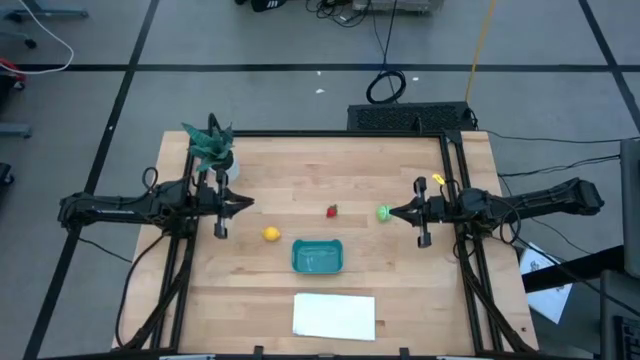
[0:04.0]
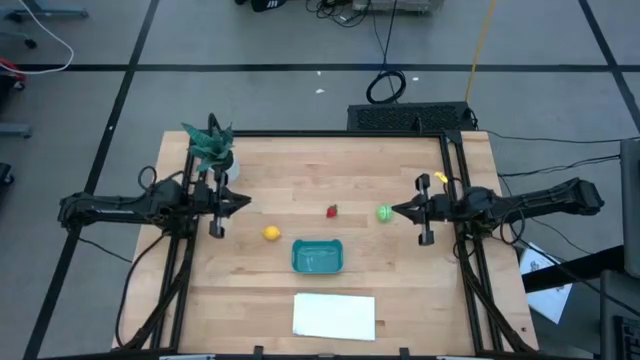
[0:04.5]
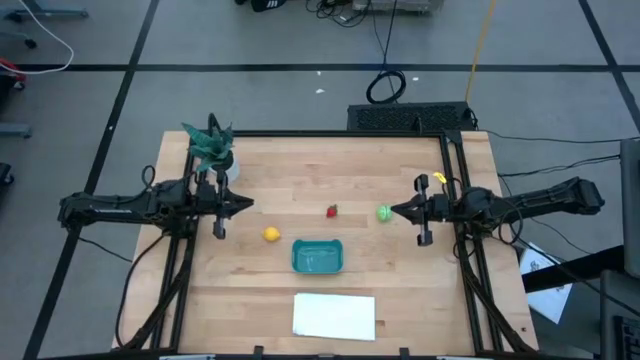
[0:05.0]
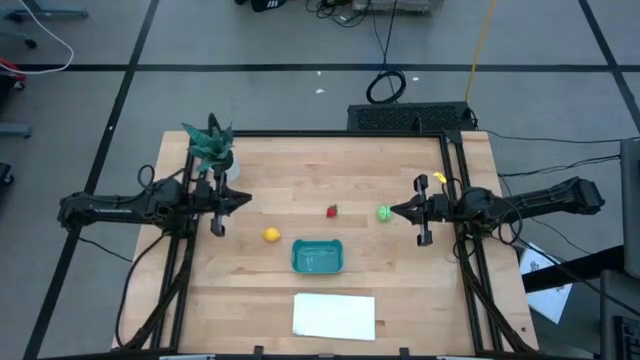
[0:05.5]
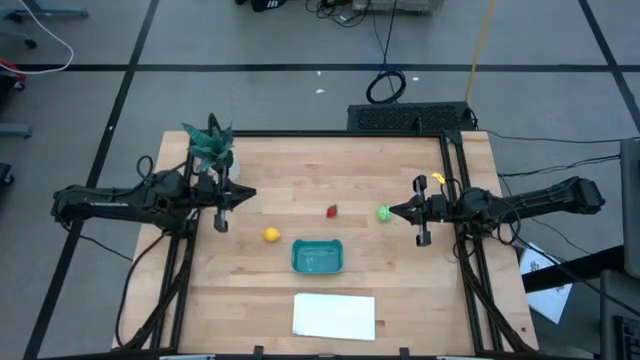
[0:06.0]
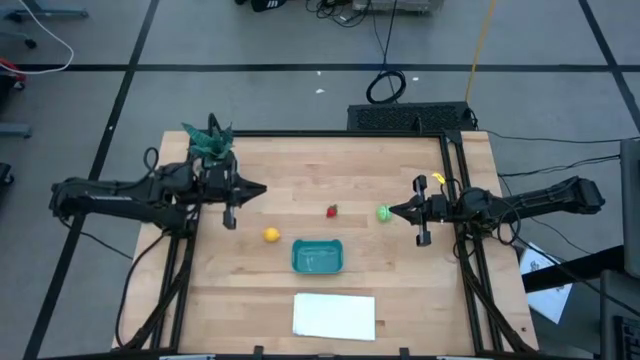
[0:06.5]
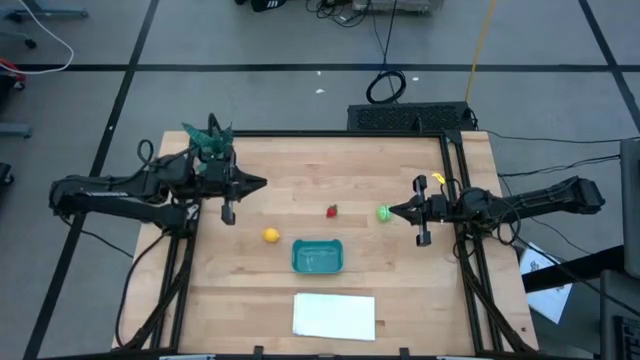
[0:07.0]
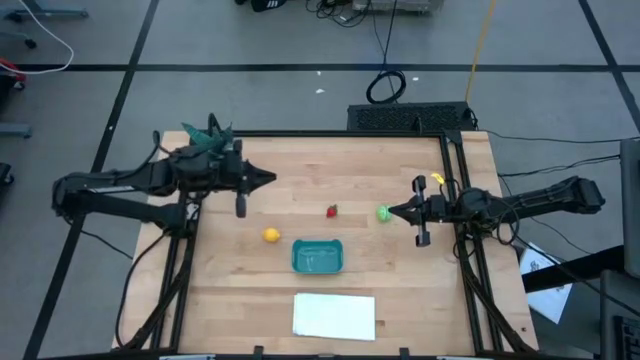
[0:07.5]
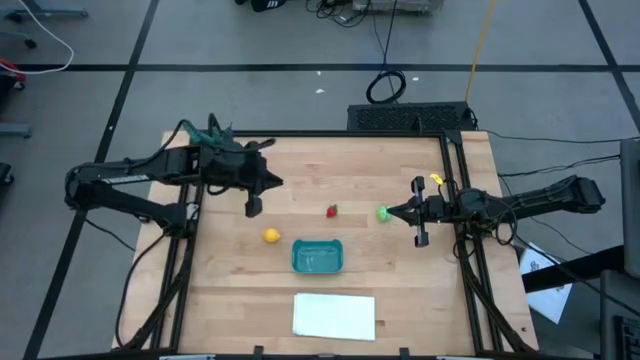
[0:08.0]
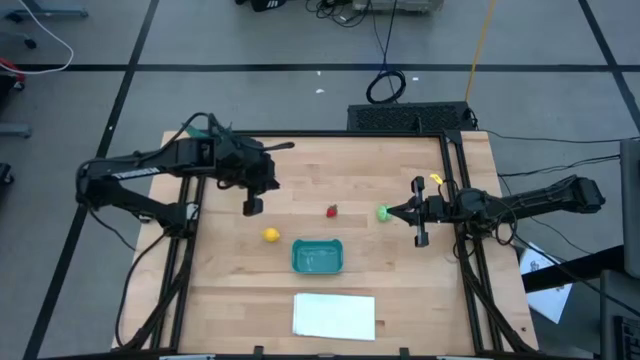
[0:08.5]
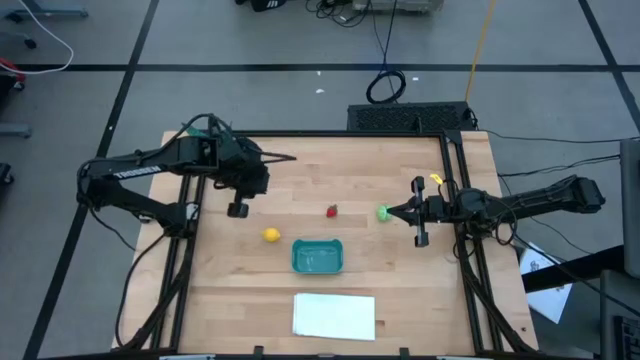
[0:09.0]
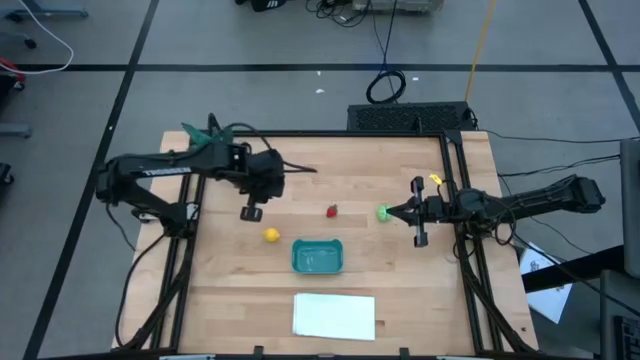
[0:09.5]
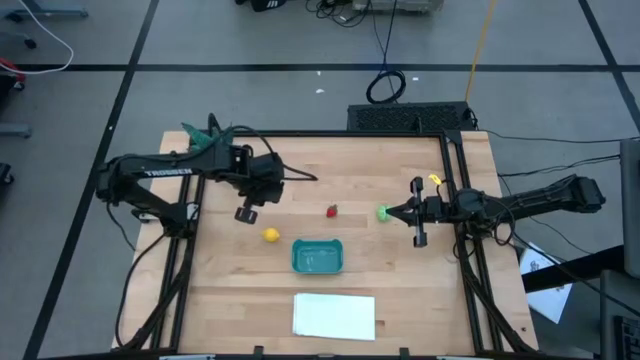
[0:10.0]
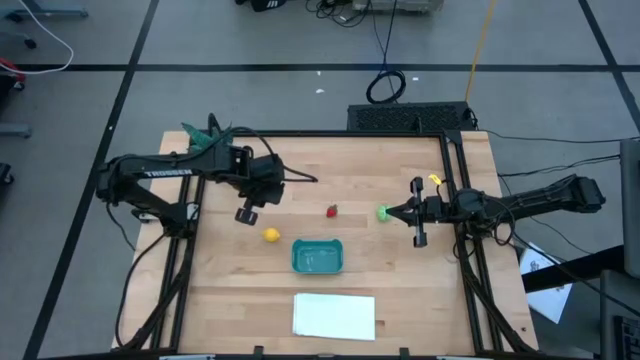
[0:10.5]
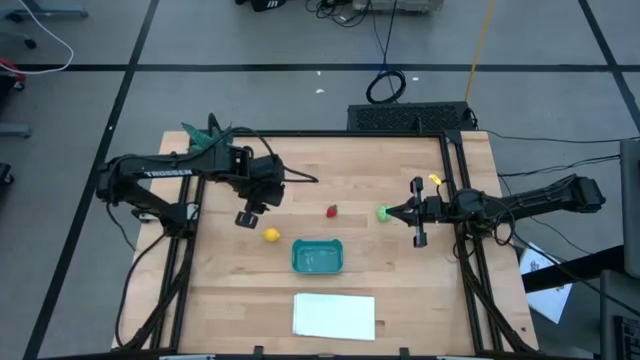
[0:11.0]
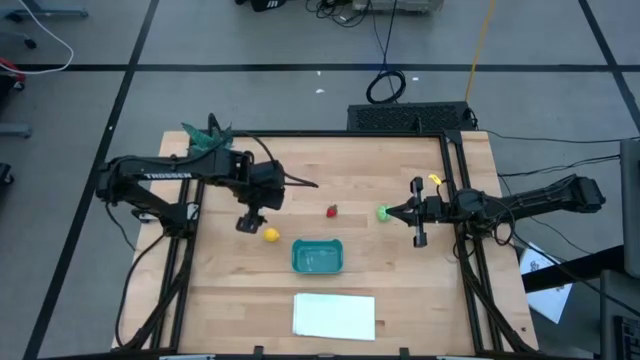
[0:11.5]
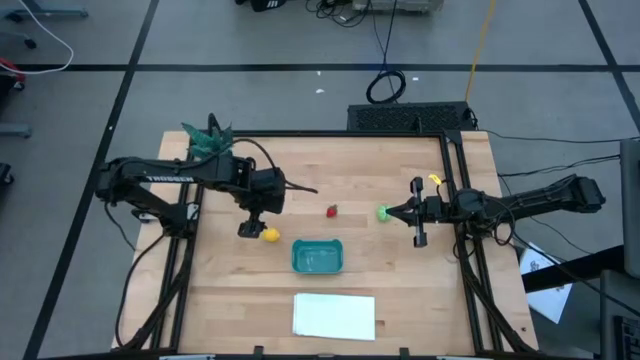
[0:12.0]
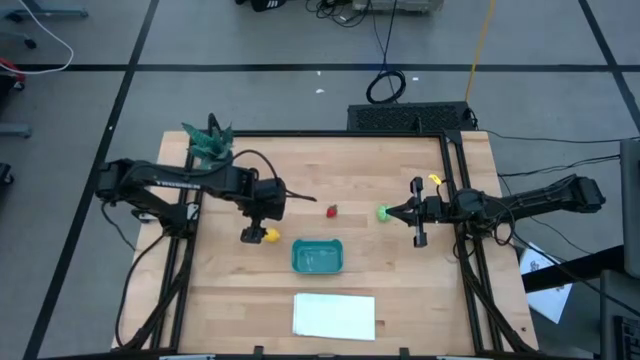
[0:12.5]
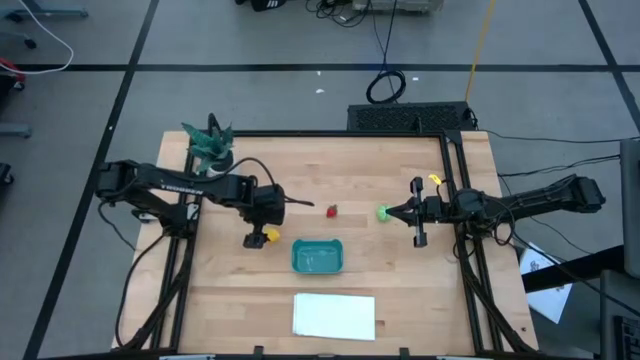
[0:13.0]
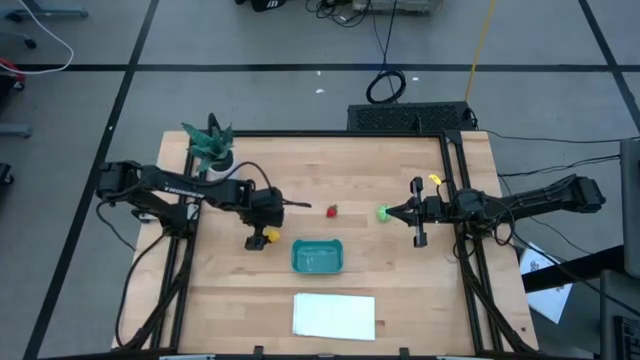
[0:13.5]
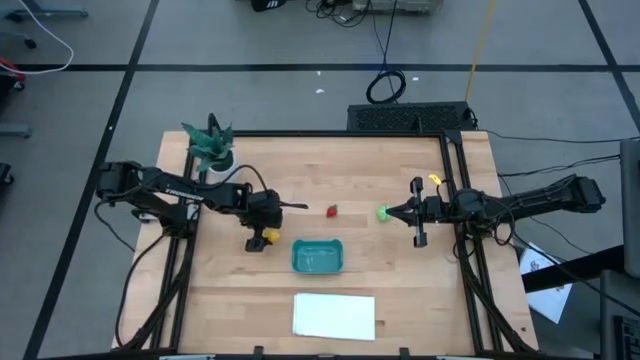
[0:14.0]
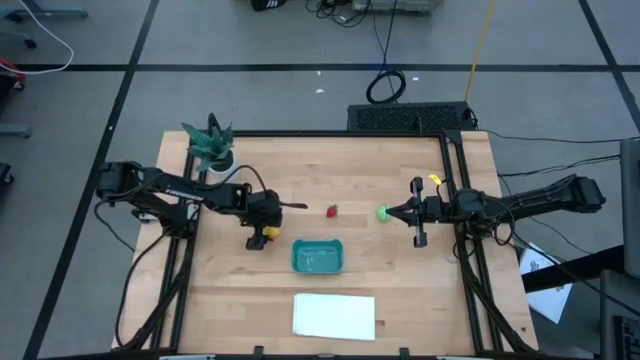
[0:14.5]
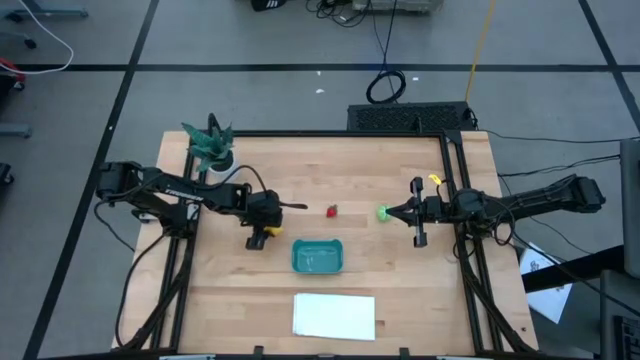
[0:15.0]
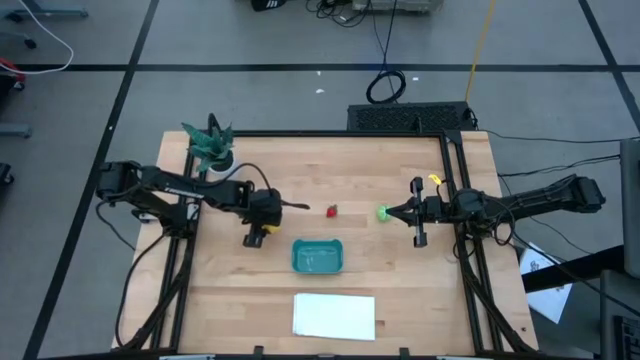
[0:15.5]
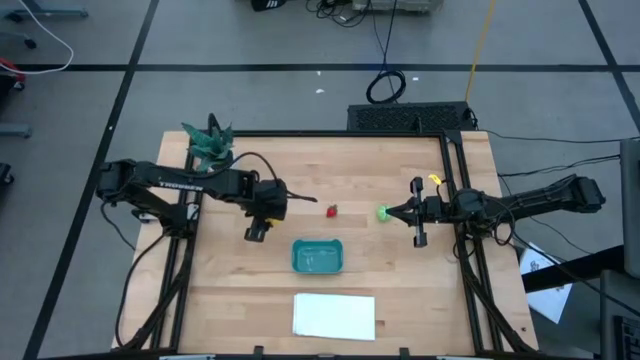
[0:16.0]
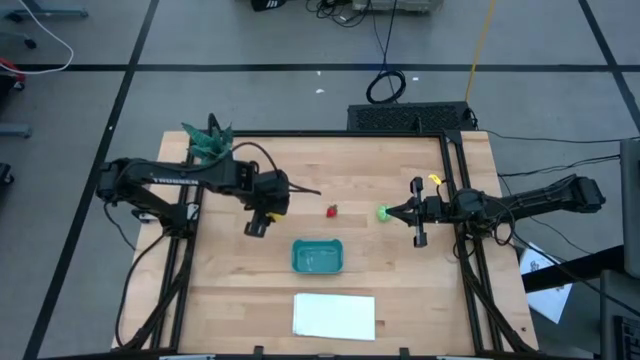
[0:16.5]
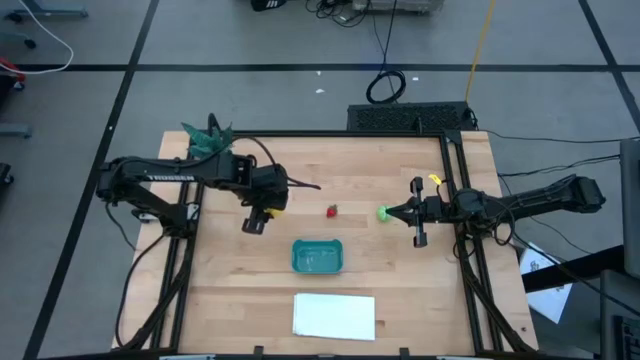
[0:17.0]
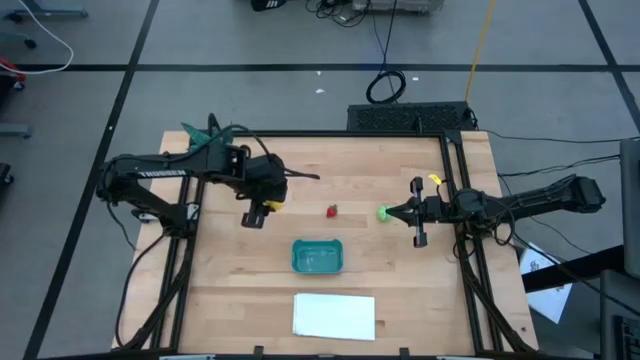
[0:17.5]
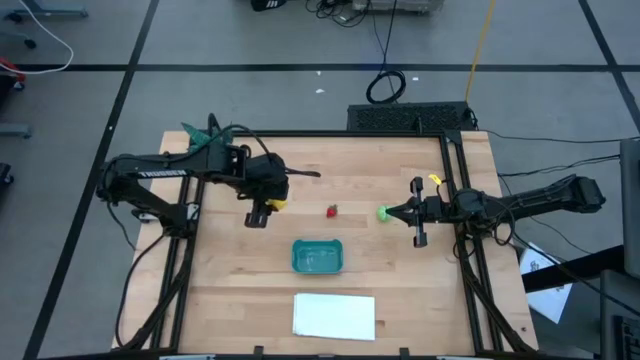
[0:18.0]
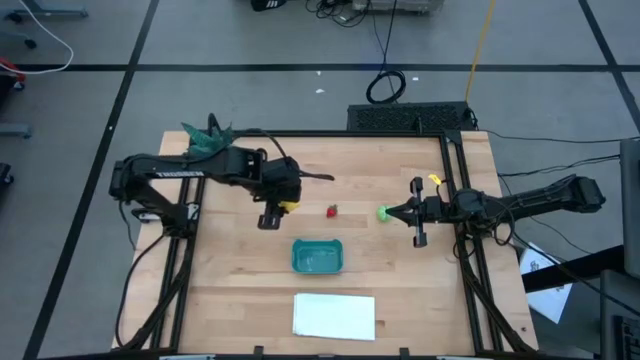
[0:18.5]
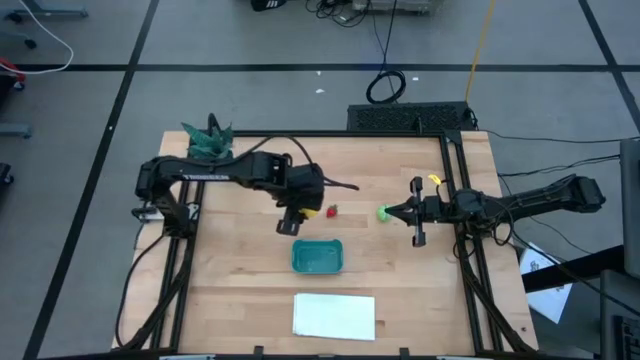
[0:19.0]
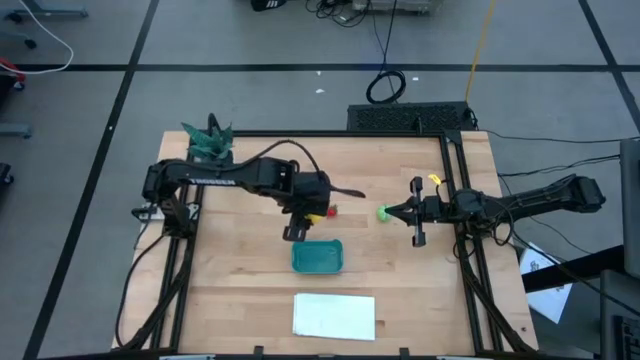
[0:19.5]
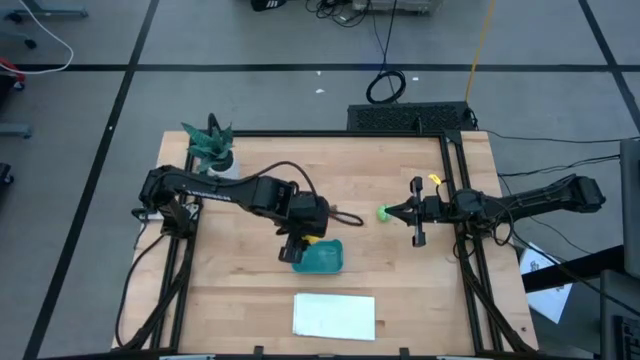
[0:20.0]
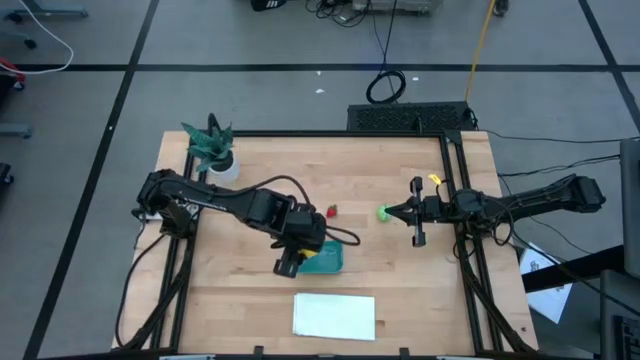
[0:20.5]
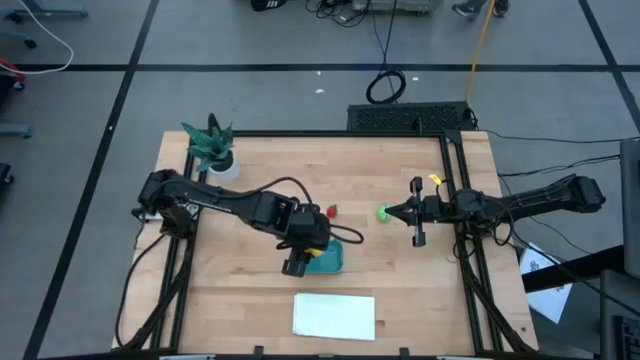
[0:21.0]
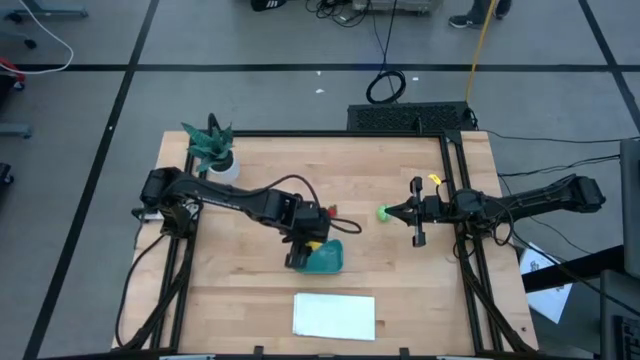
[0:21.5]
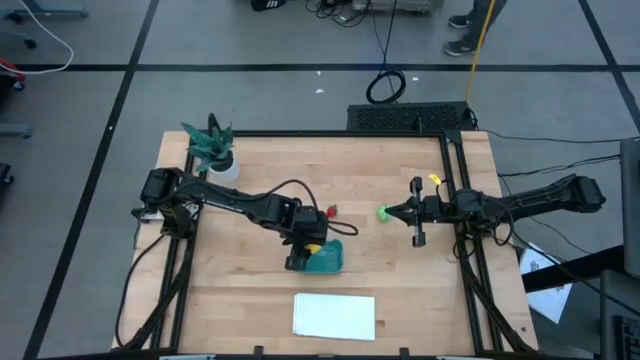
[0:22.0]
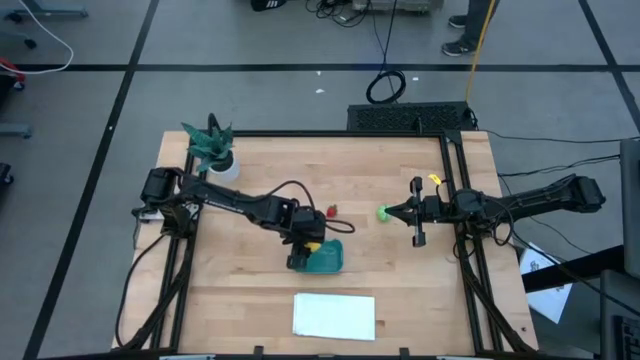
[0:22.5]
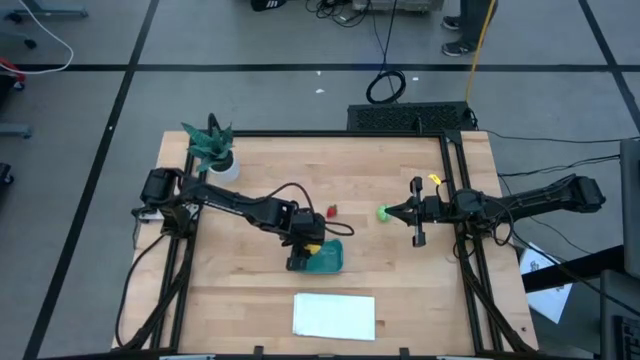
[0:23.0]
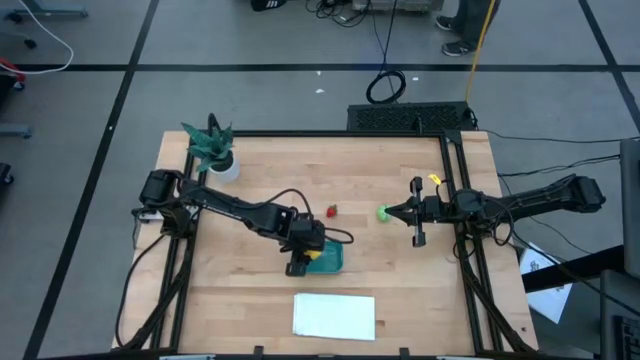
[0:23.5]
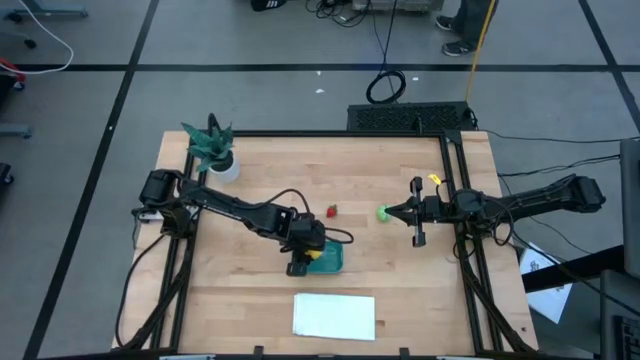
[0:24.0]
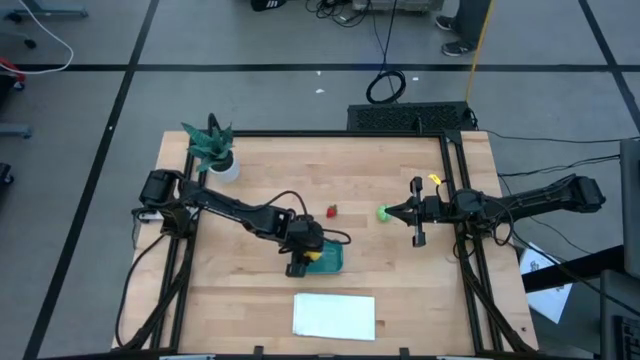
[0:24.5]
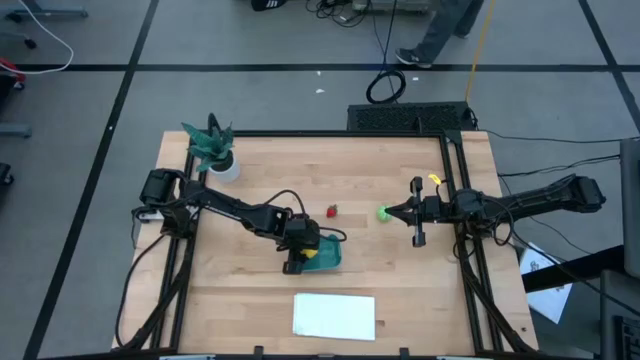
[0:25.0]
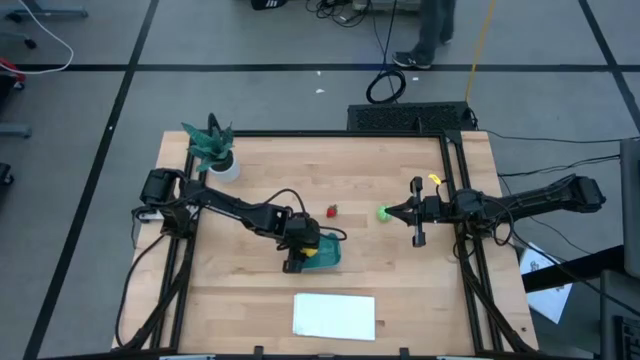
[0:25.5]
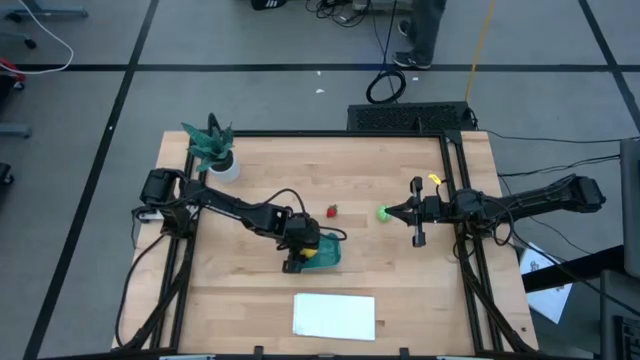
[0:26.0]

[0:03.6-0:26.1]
Task: Pick and placing Produce into tupperware
Put the yellow lemon into the blue bin
